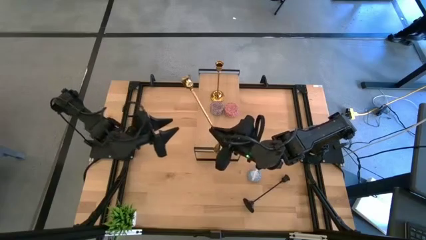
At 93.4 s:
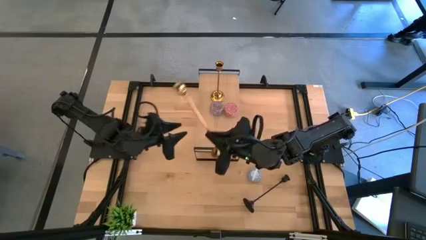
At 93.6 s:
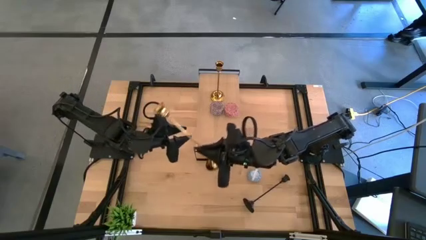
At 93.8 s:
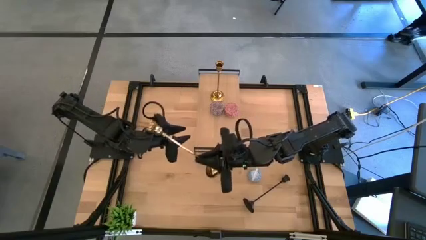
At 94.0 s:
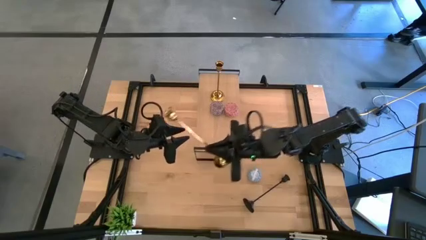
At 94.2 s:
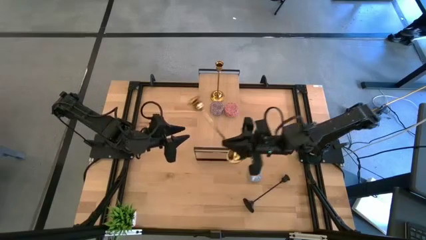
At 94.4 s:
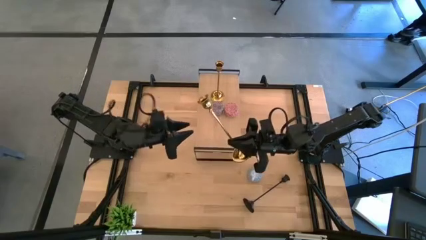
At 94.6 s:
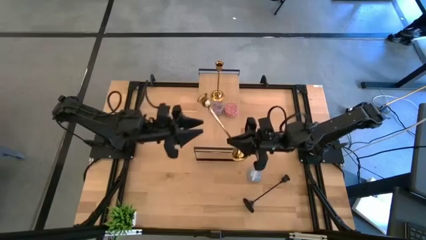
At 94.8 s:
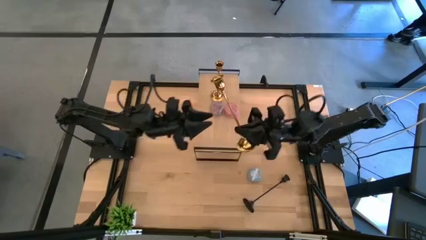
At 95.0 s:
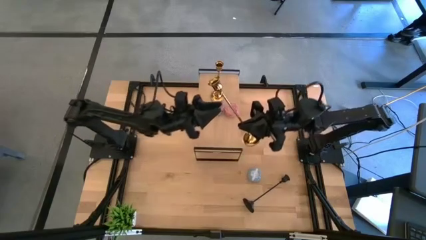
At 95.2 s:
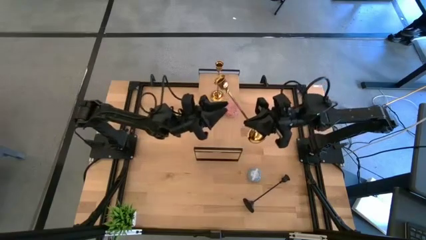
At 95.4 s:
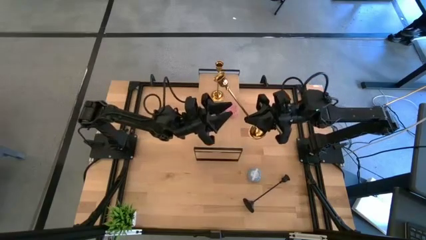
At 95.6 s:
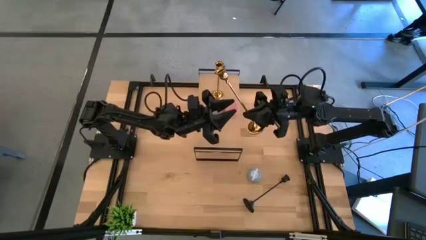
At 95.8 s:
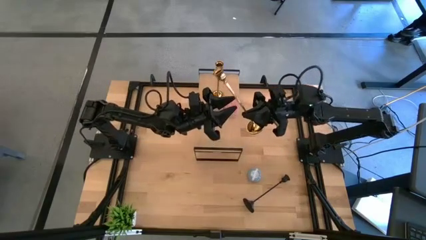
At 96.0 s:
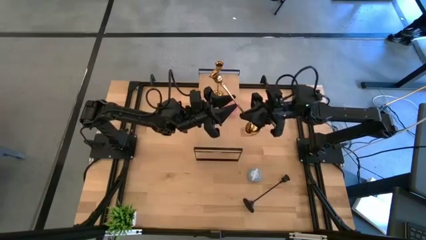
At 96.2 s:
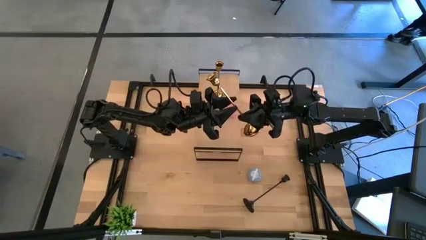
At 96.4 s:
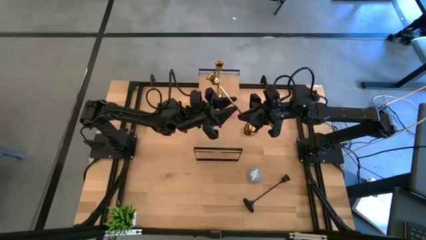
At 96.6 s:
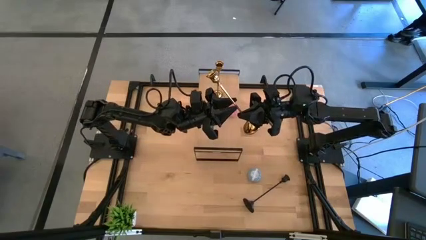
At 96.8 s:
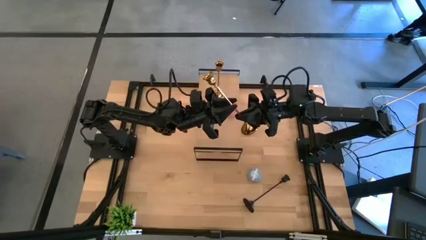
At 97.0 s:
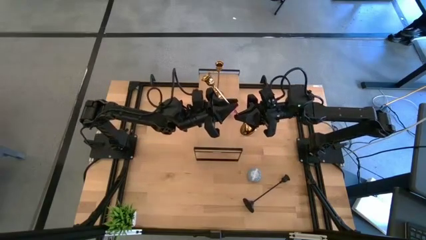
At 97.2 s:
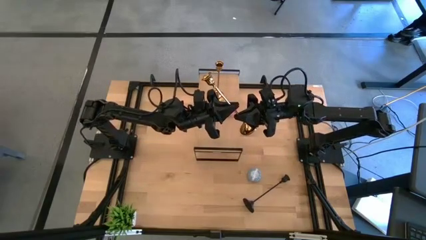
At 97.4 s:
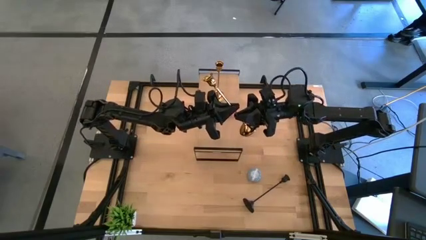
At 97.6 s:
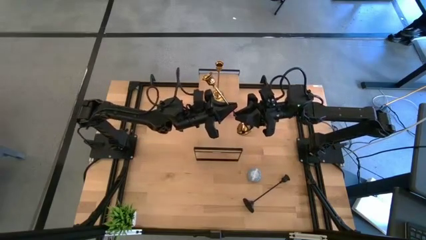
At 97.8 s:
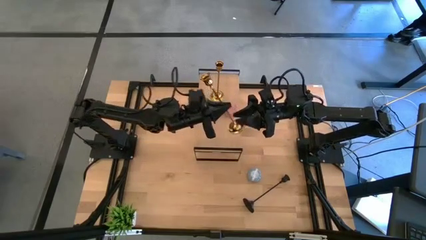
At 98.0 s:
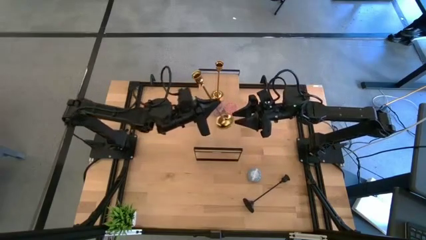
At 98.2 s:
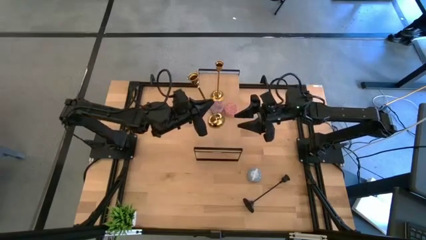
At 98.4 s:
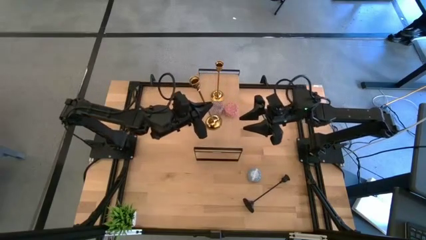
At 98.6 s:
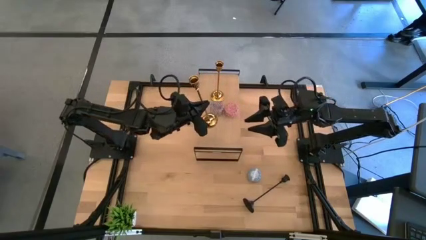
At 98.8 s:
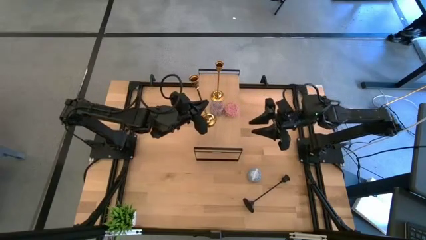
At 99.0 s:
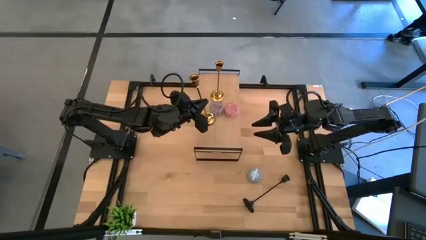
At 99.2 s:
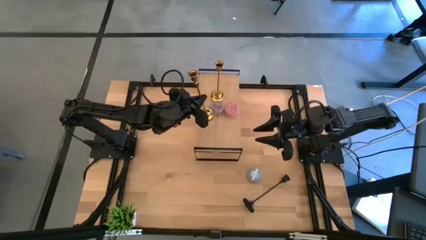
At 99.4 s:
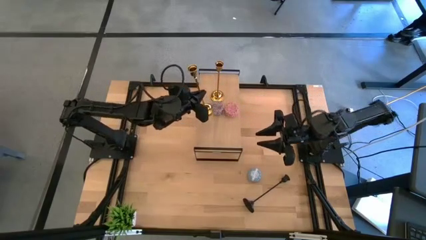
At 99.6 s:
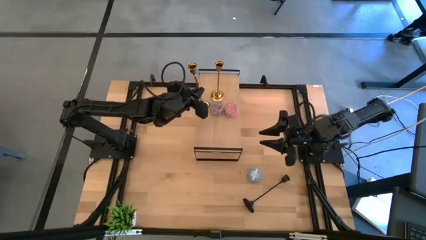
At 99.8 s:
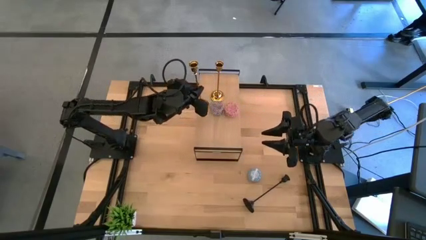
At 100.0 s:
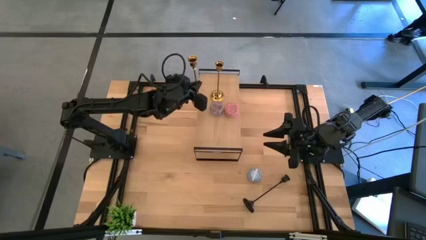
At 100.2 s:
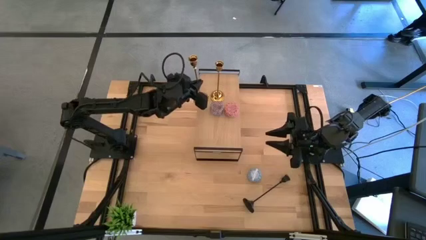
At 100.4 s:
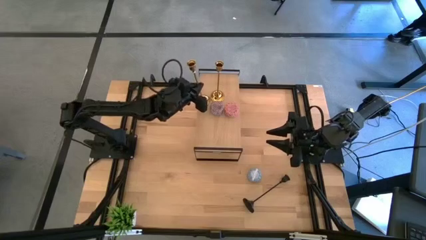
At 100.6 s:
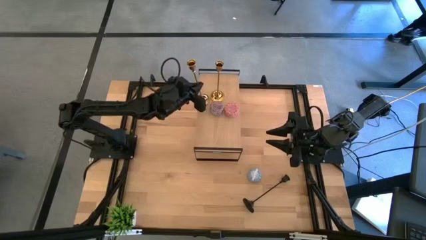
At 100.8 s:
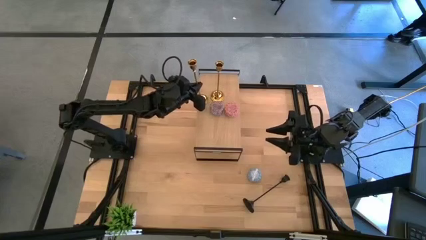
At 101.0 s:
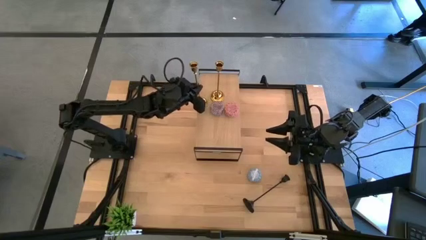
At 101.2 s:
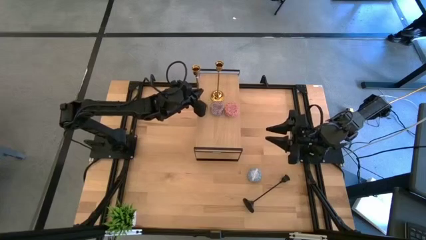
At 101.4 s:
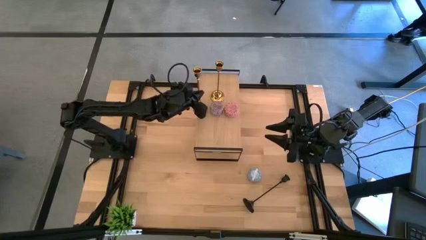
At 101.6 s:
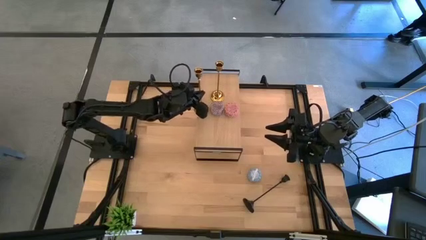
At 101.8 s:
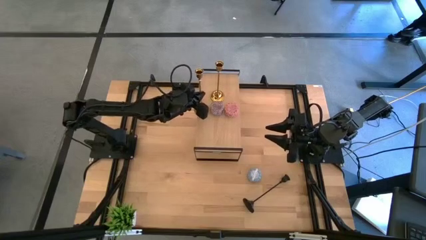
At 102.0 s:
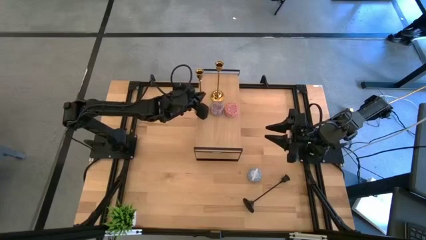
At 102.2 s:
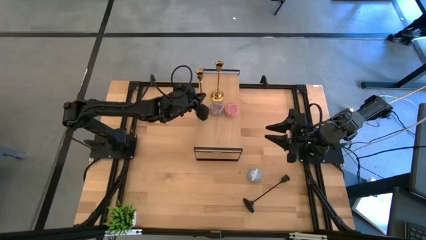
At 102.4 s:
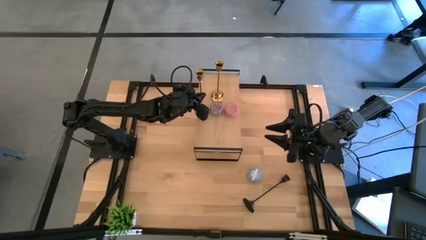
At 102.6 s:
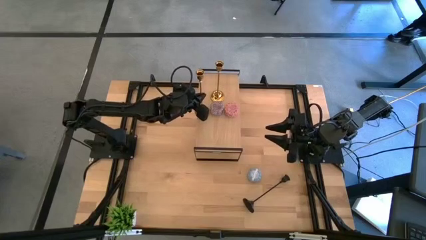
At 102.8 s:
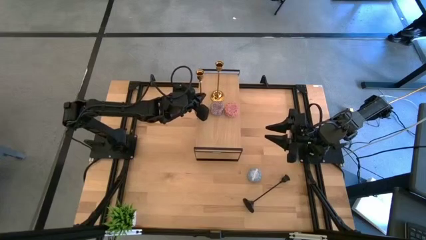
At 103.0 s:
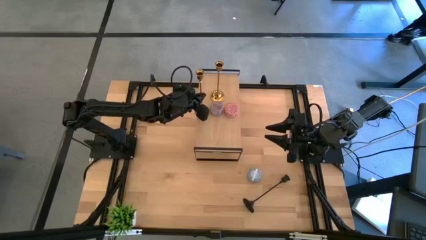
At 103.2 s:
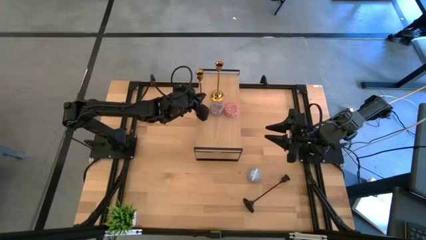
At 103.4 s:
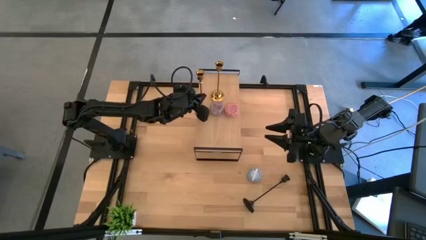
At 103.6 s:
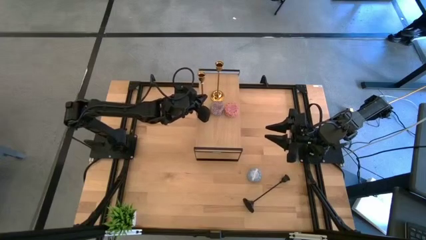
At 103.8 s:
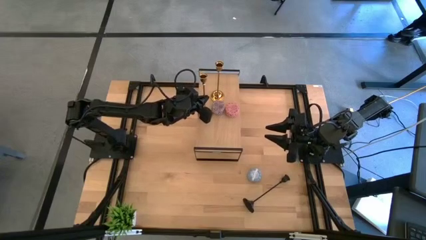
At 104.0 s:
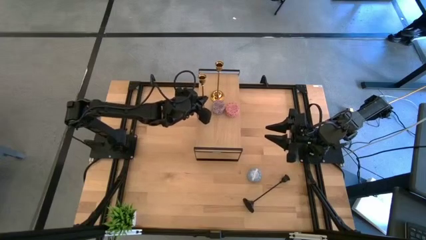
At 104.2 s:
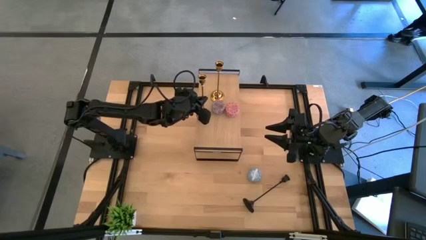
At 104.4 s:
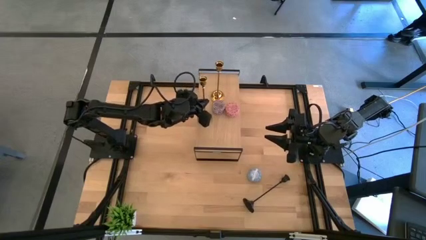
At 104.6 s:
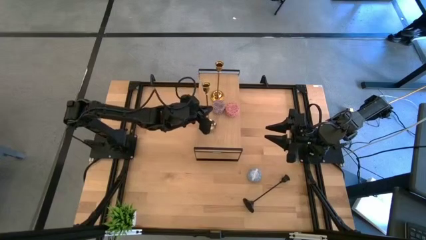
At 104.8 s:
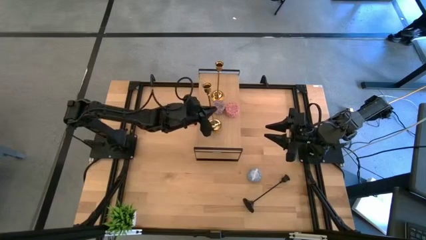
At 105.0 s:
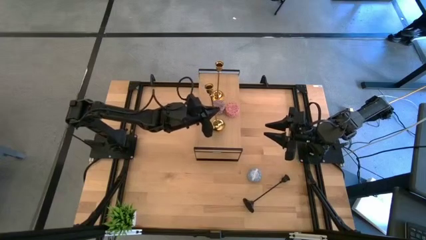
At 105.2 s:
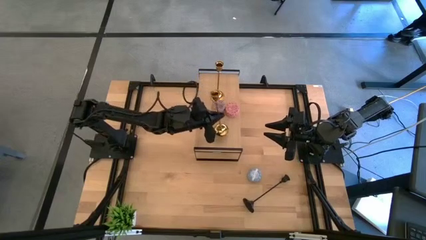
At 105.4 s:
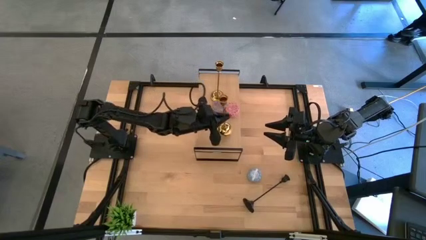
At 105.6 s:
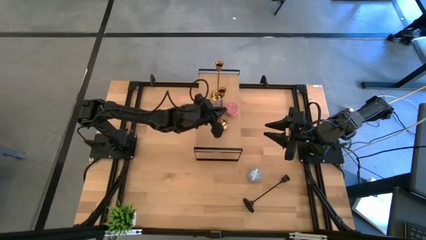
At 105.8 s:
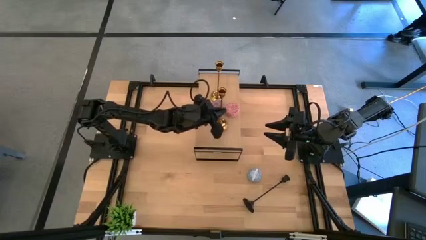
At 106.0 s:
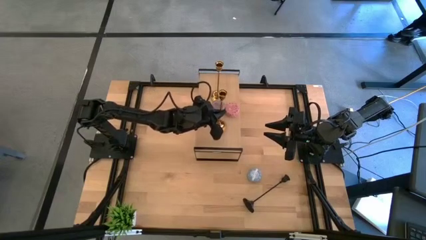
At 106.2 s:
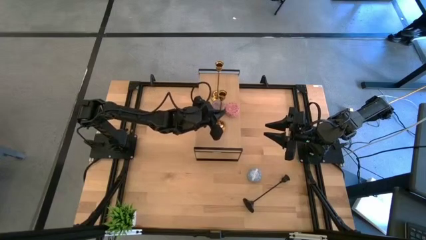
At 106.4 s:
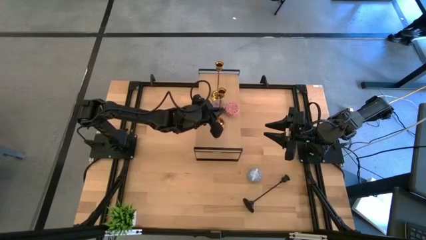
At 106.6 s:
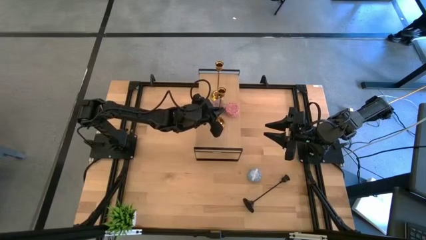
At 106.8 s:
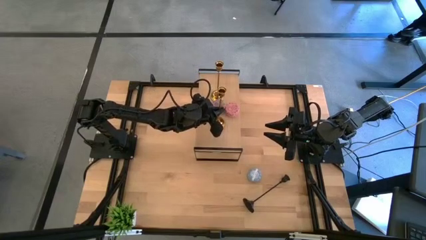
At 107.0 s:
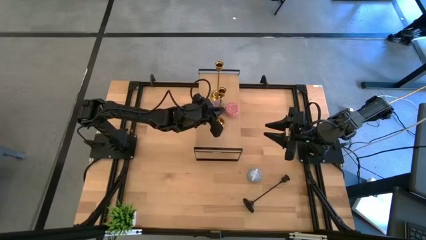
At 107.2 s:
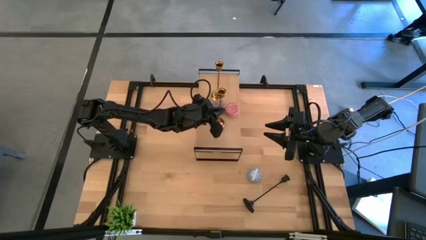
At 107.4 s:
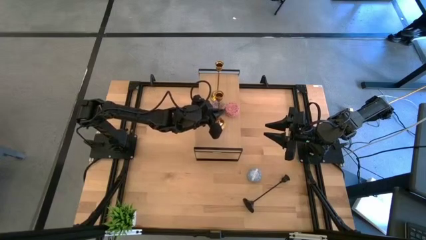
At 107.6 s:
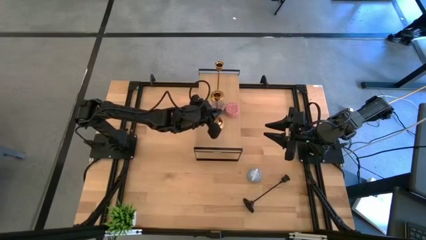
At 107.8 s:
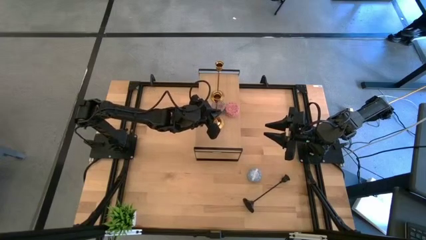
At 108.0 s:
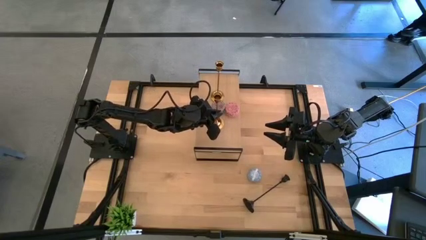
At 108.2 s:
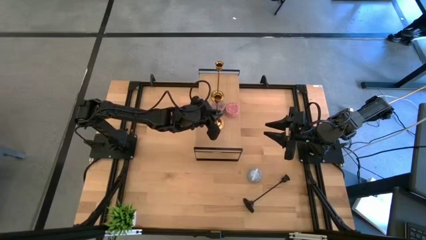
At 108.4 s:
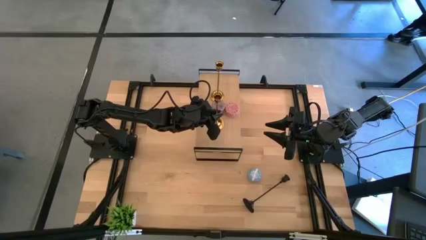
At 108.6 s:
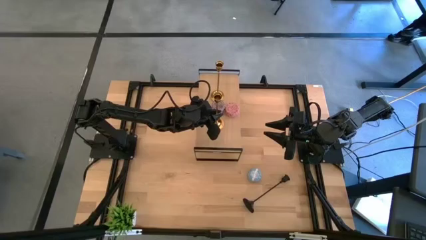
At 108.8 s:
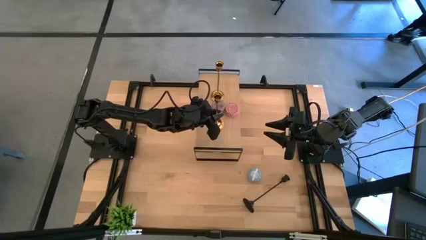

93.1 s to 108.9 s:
Task: Pick & Place candle stick holders
Put the gold candle holder on the shelf
